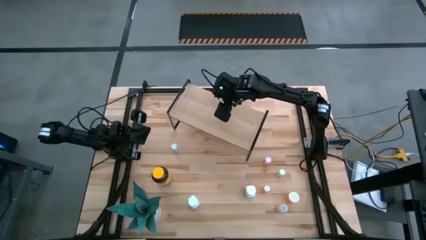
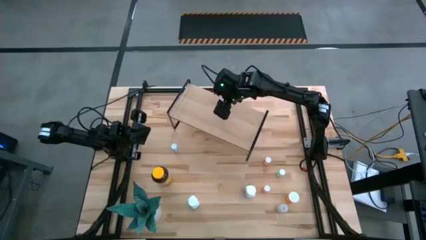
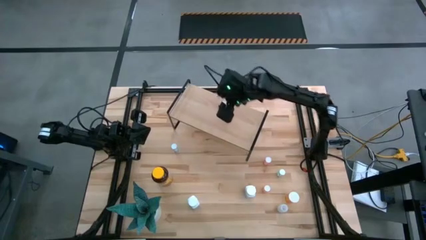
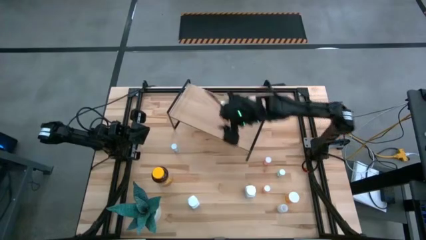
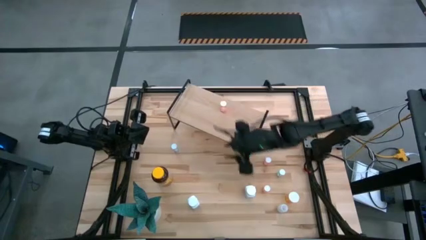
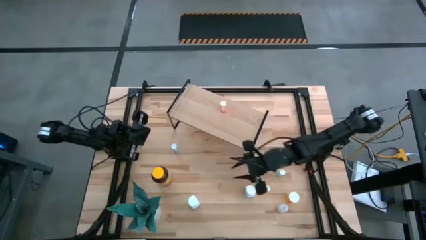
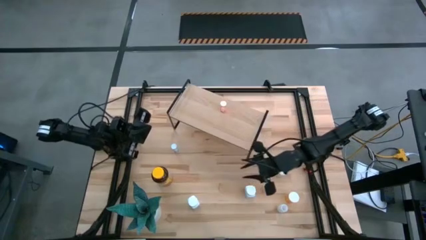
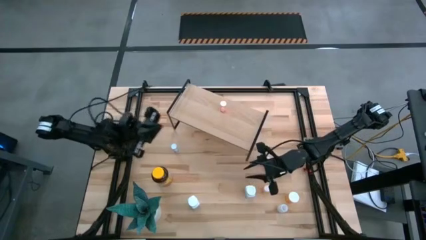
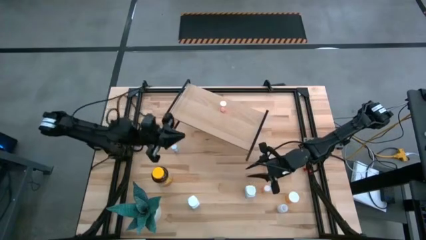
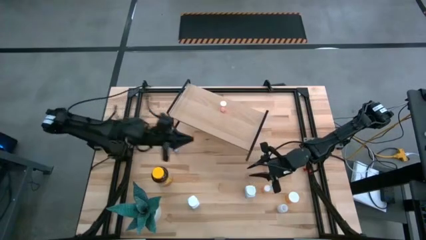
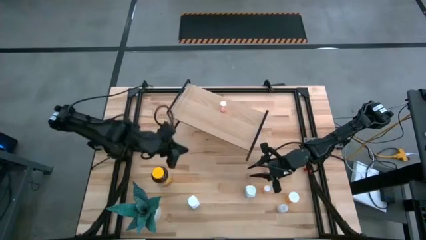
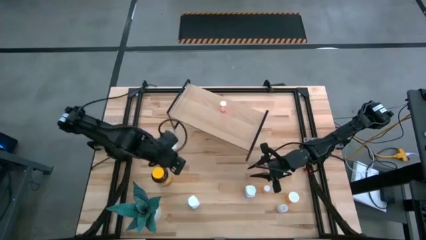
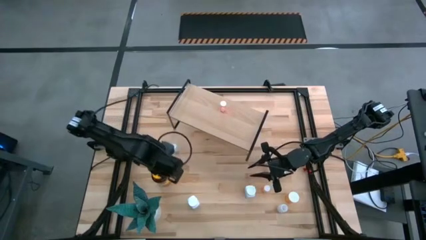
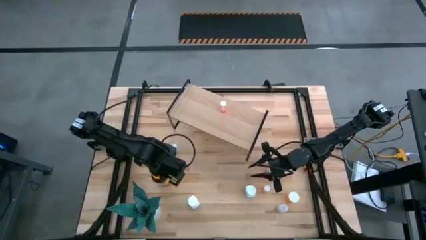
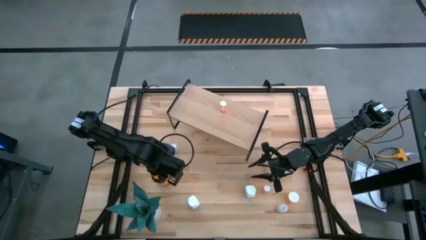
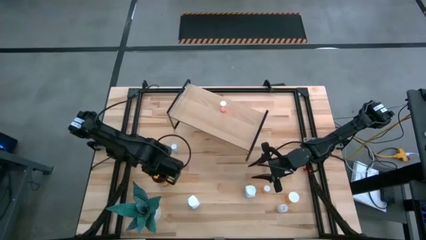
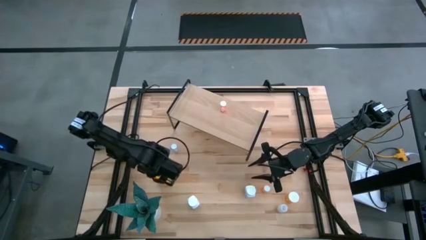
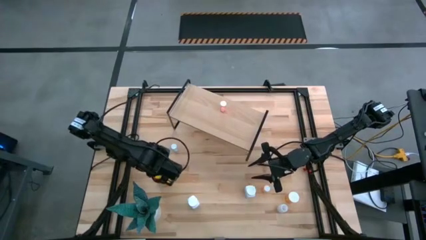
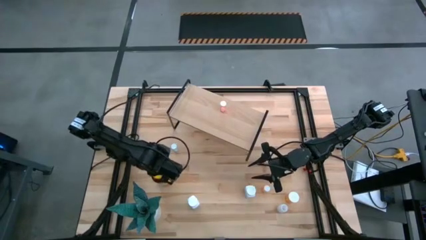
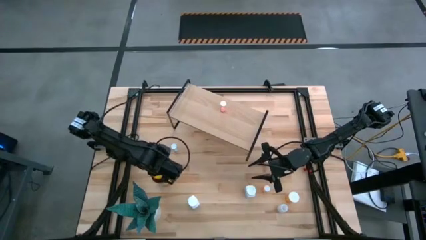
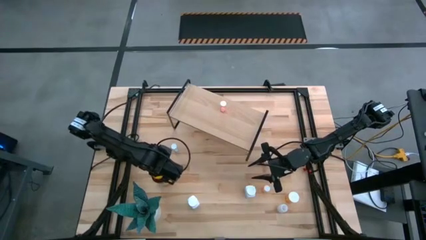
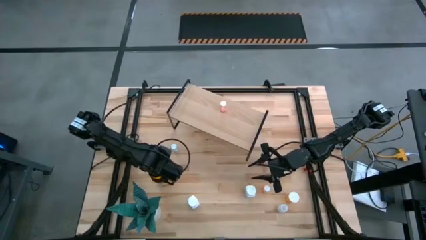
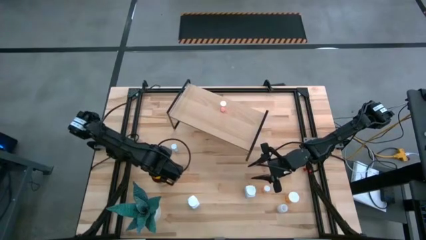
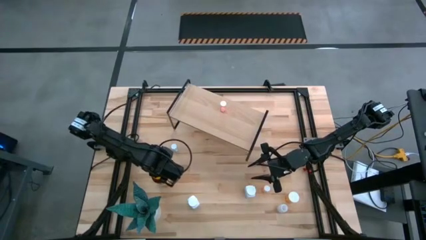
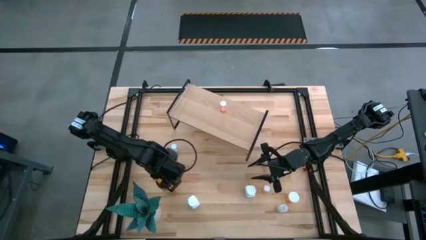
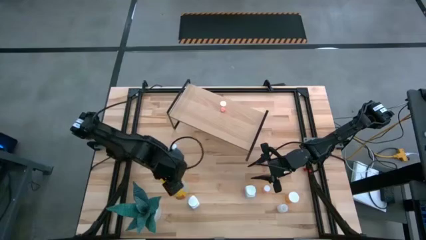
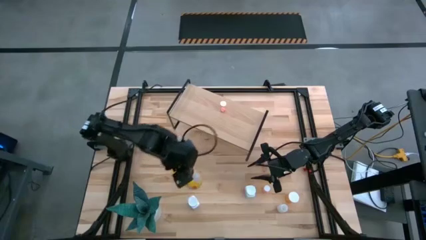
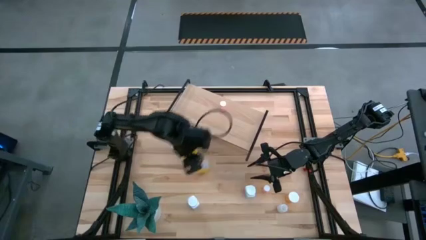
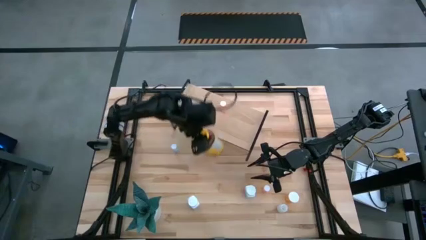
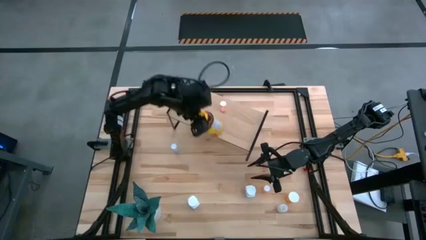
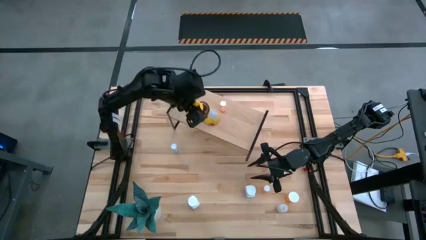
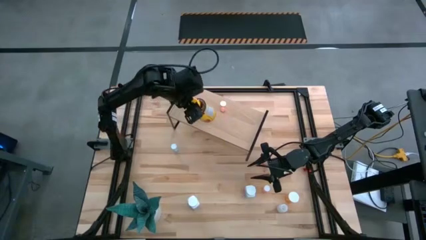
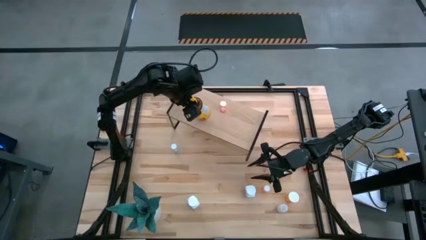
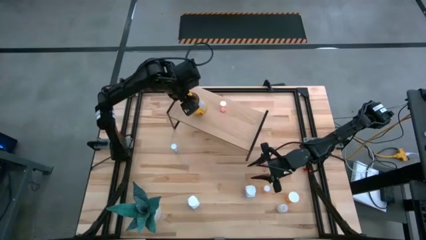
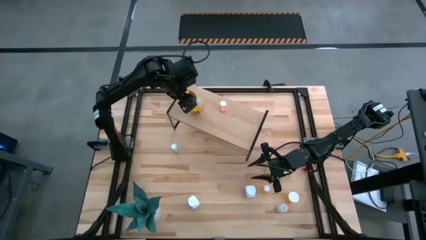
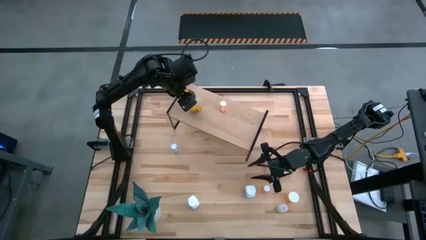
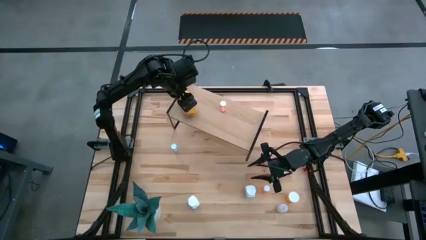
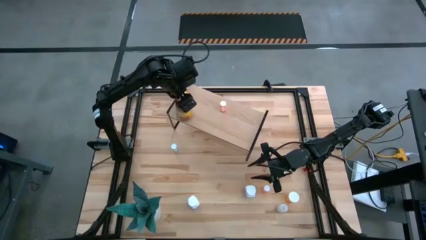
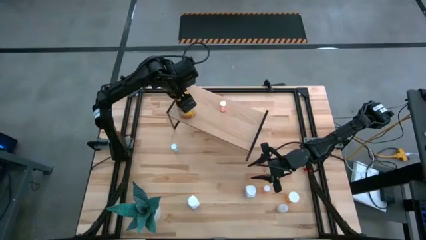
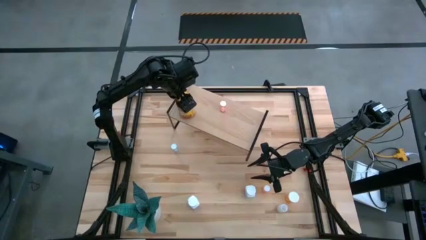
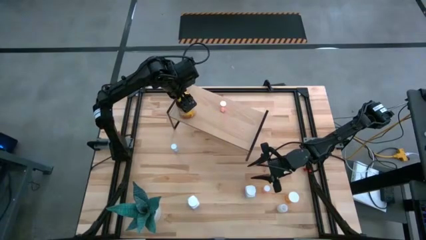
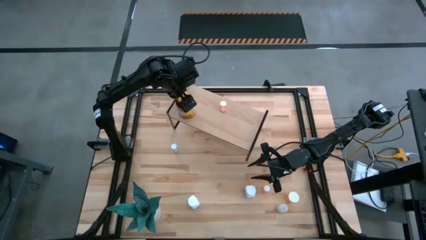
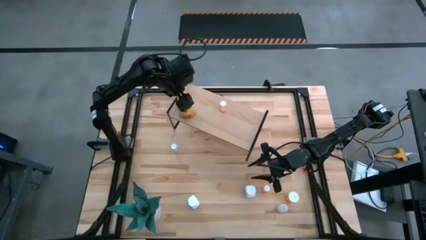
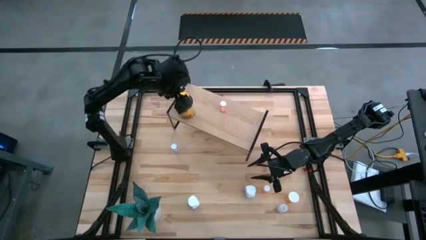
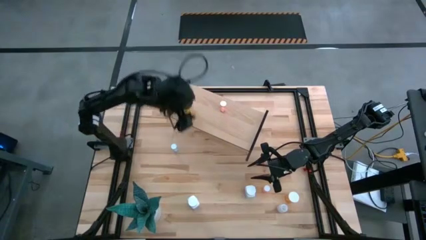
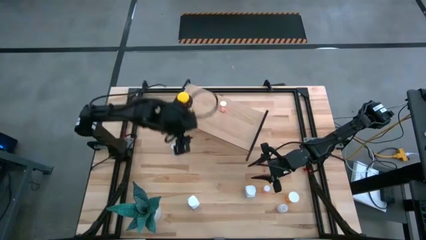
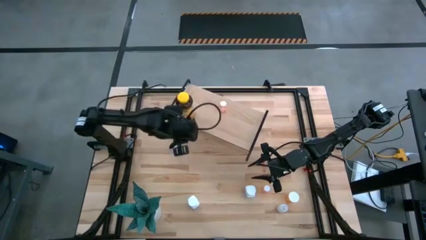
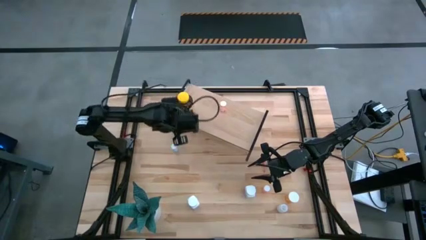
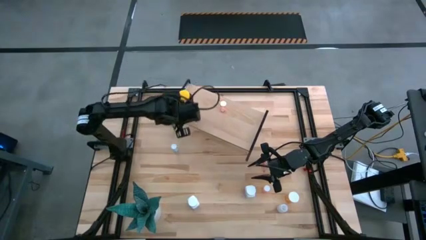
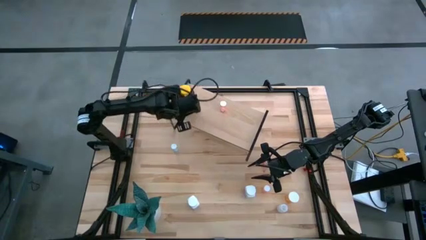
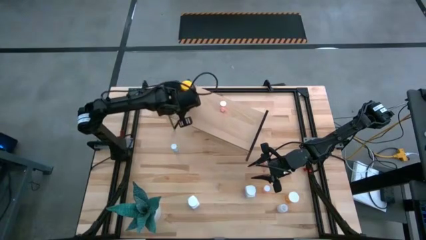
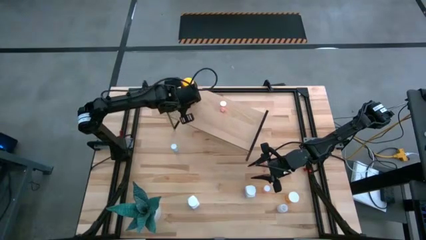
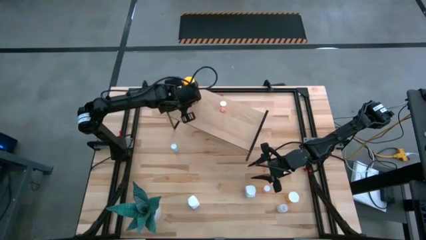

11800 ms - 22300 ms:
Task: Pick and place medicine bottles onto shelf by color
Put the yellow pill bottle on the shelf
